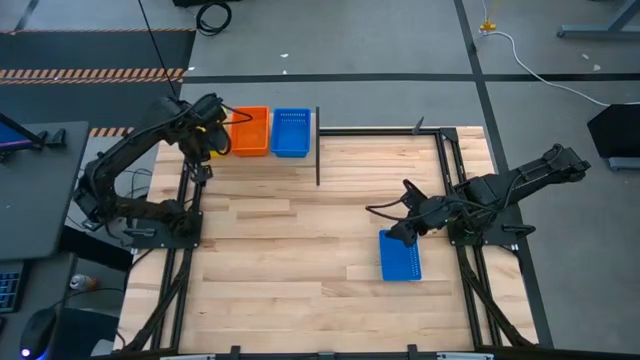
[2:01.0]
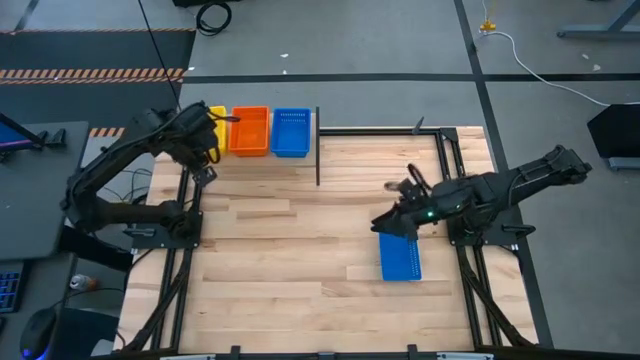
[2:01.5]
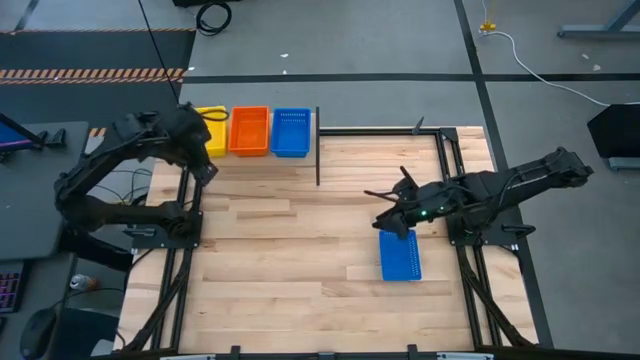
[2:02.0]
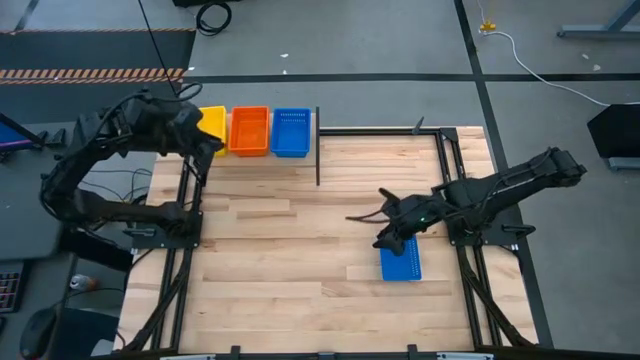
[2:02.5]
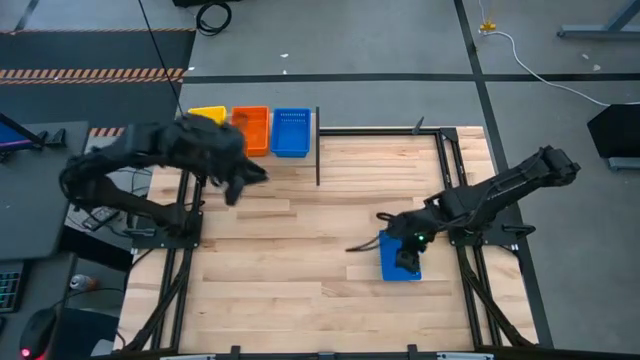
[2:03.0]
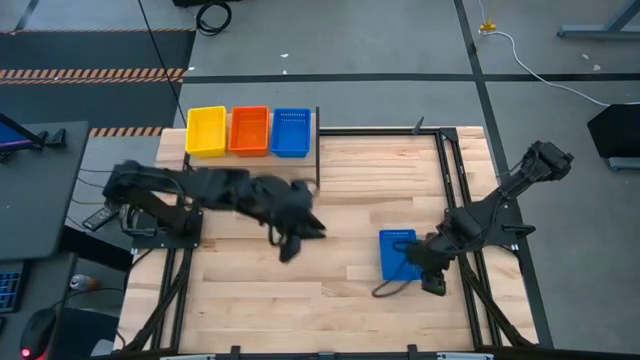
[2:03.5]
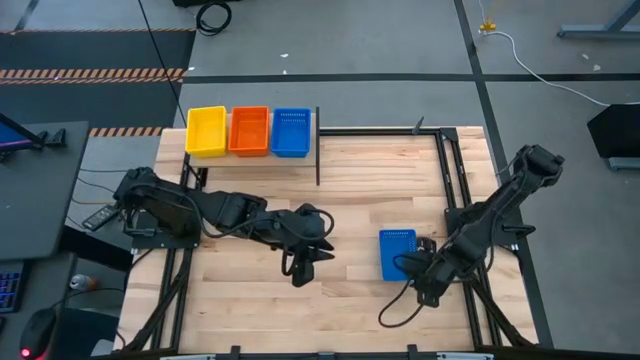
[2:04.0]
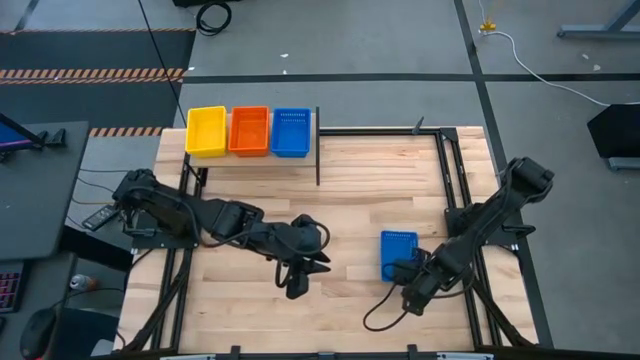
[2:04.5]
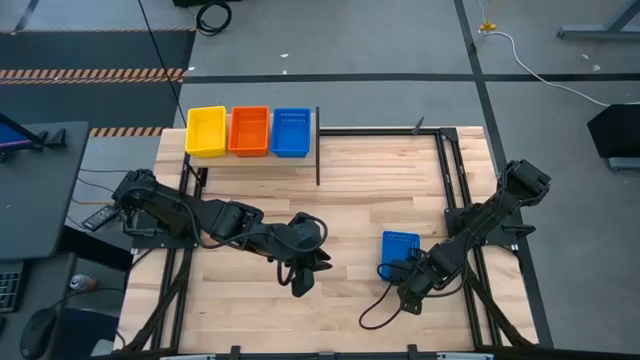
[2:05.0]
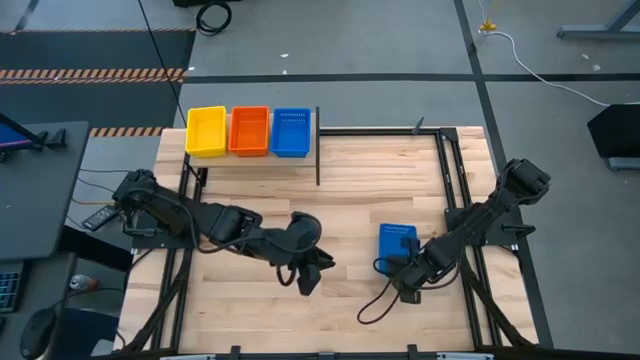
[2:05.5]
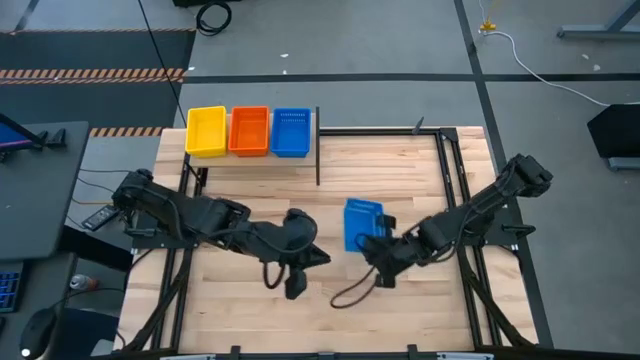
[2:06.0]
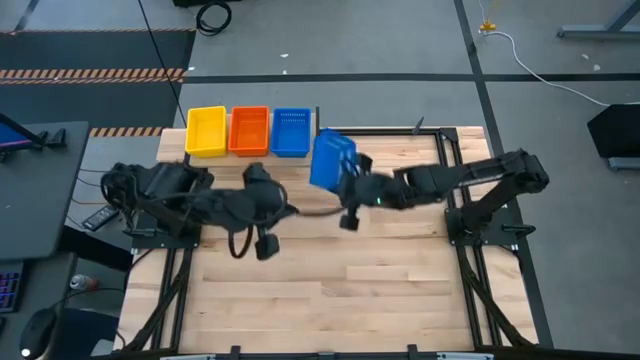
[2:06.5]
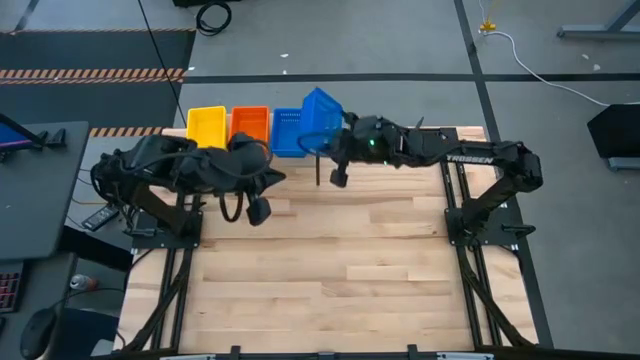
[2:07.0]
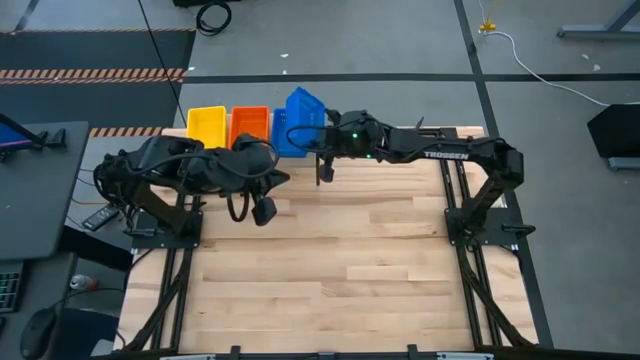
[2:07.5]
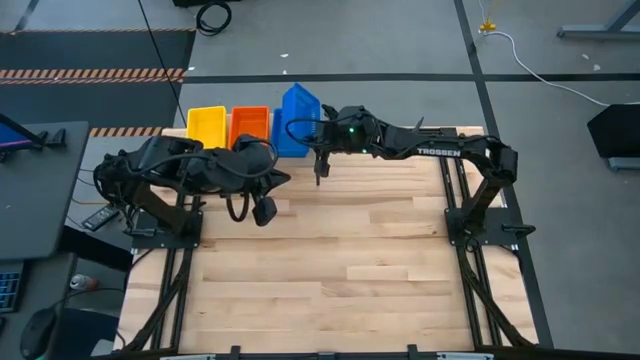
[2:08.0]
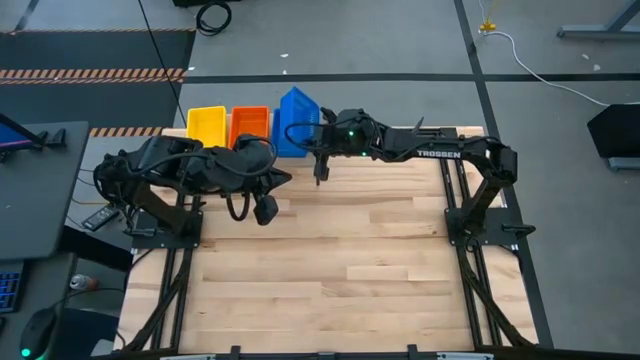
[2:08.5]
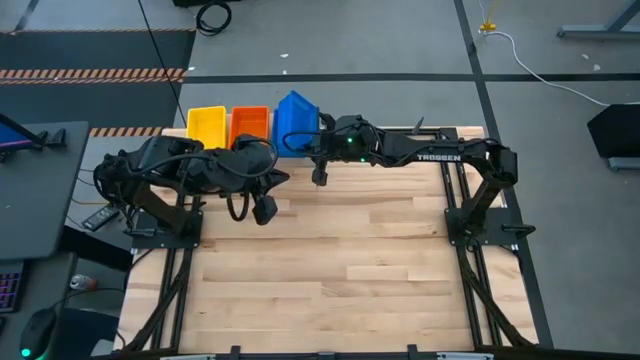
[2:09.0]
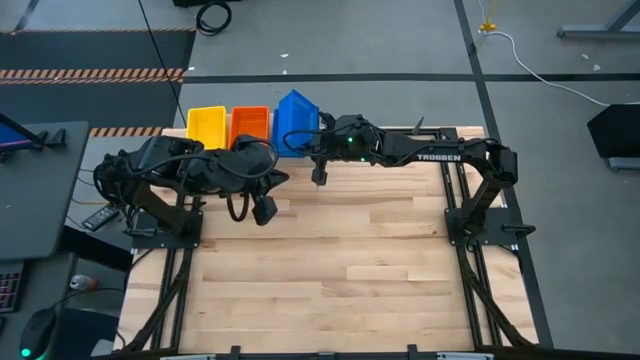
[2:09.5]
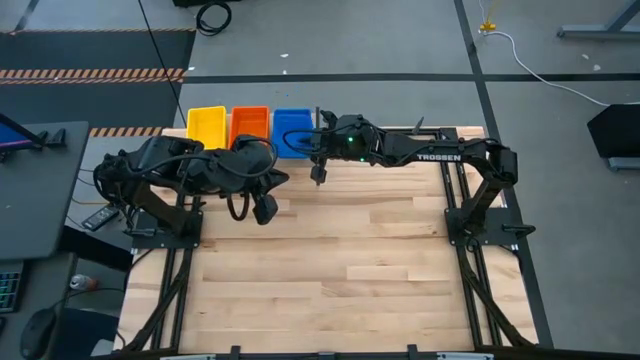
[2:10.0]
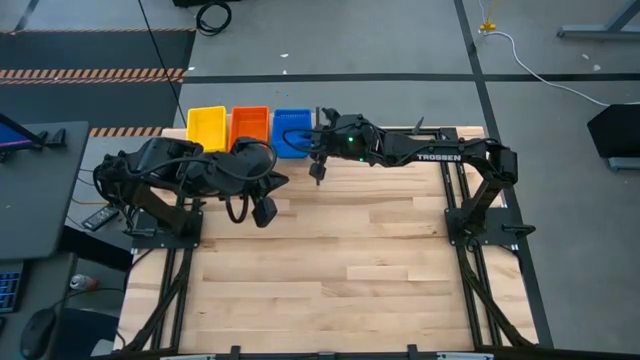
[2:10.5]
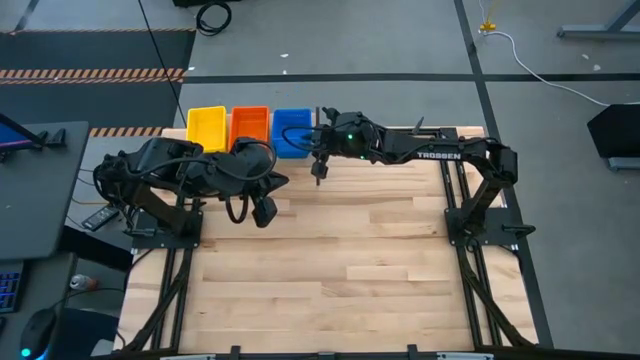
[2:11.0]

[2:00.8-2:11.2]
Task: Stack baskets on shelf by color
Stack the blue bin on top of the blue bin on the shelf

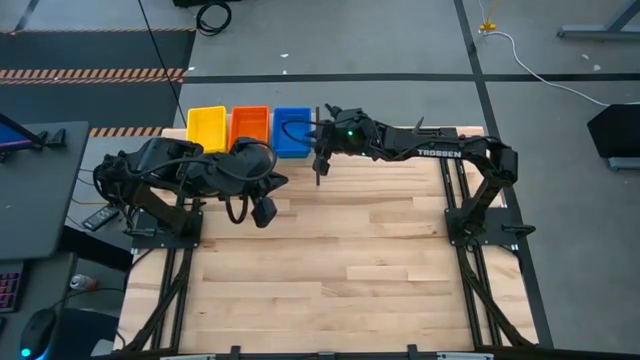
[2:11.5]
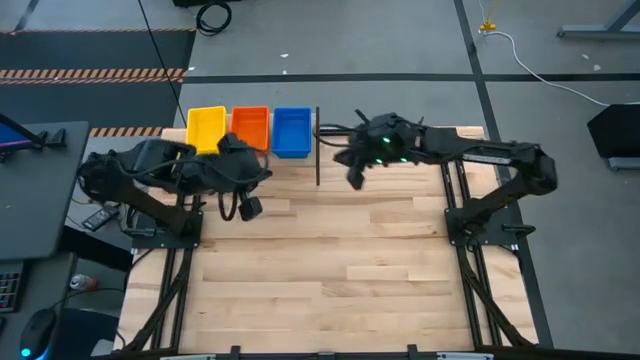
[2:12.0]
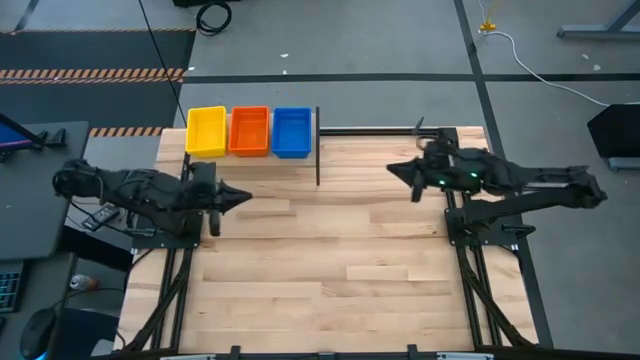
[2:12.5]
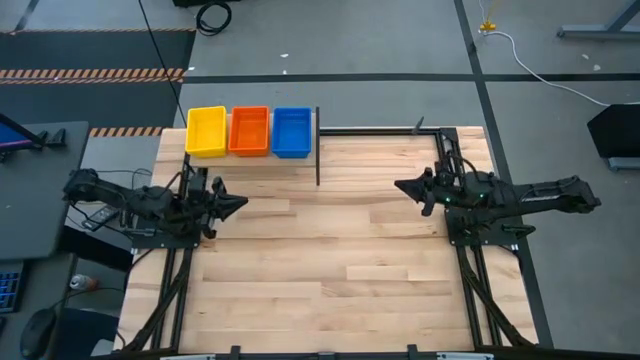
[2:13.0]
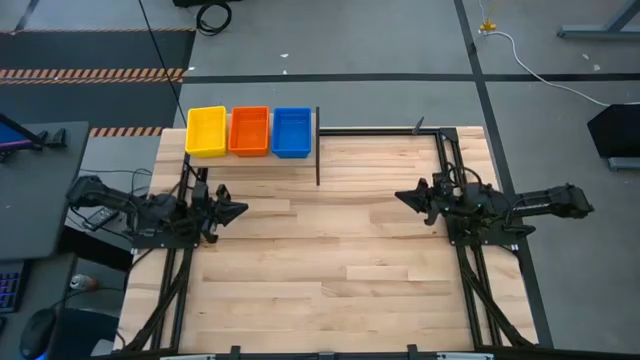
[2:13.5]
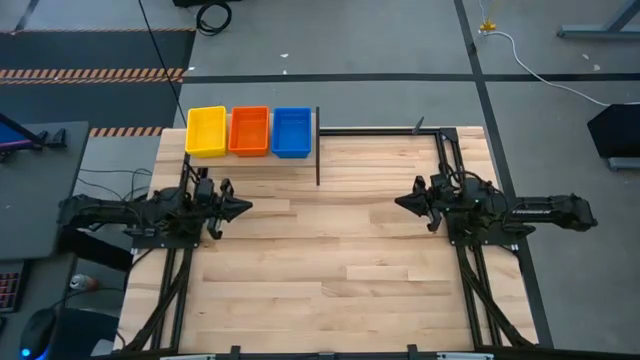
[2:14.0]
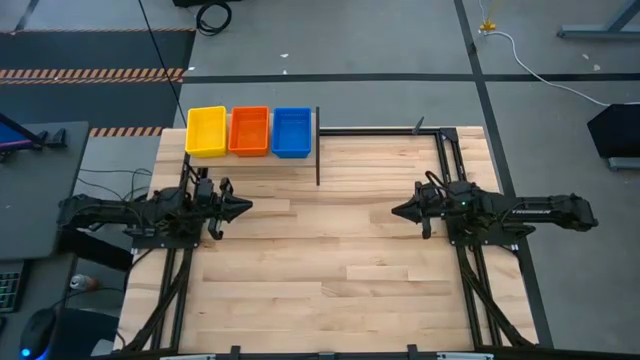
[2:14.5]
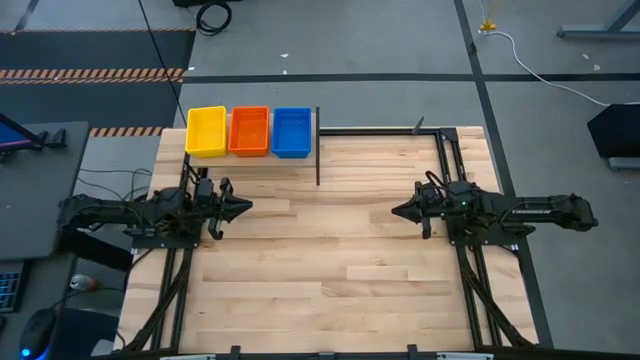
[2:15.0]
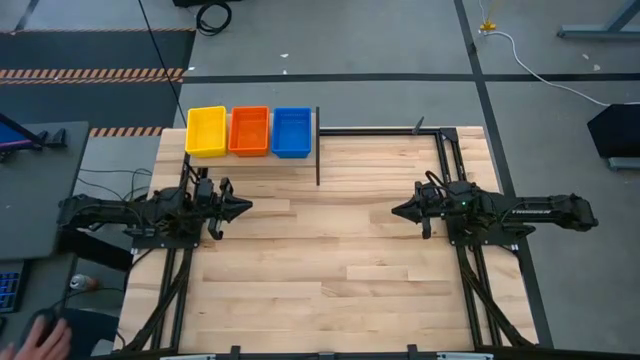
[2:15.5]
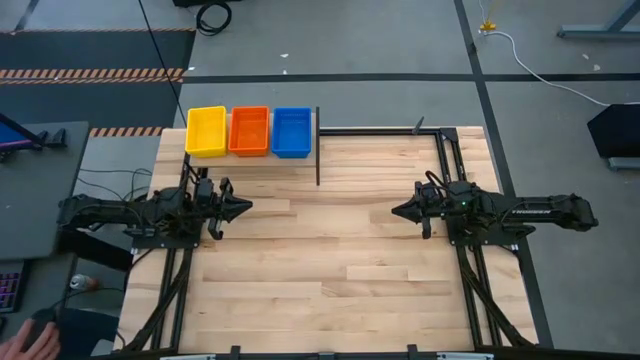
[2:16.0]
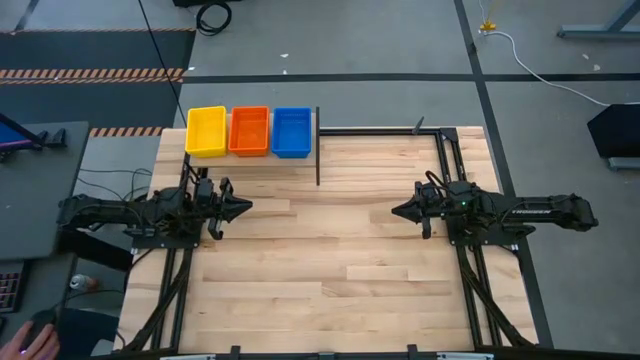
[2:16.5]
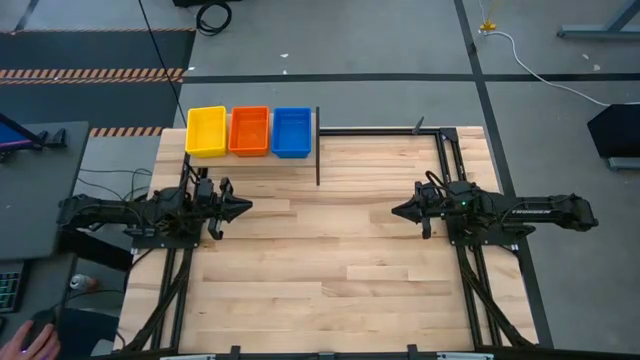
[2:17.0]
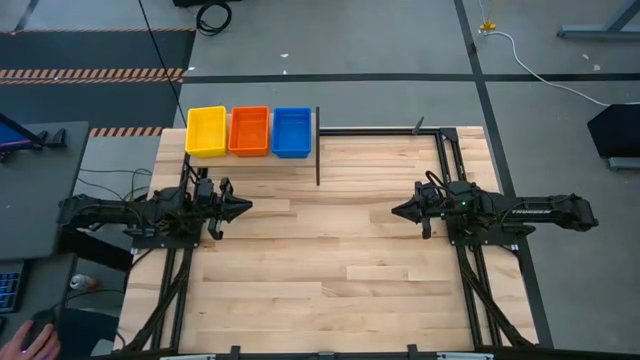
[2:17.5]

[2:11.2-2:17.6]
Return to Home Position

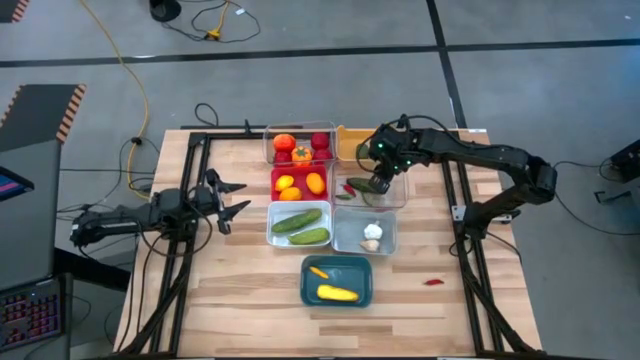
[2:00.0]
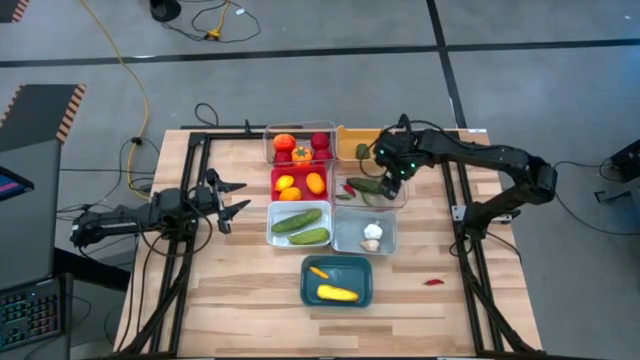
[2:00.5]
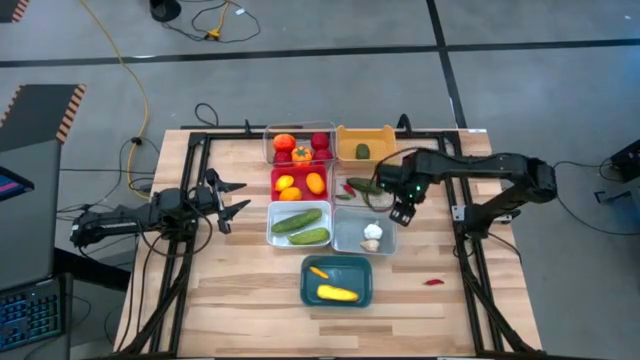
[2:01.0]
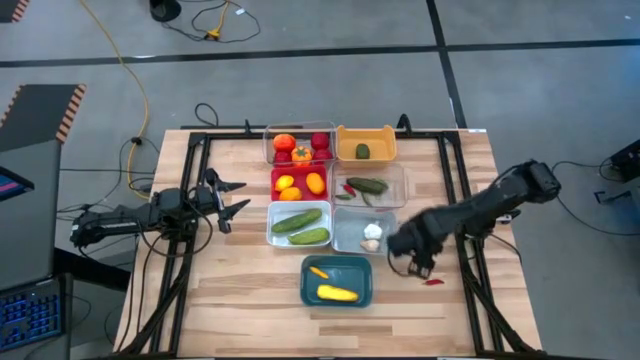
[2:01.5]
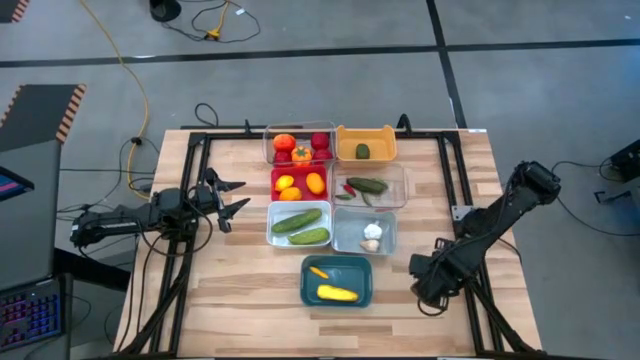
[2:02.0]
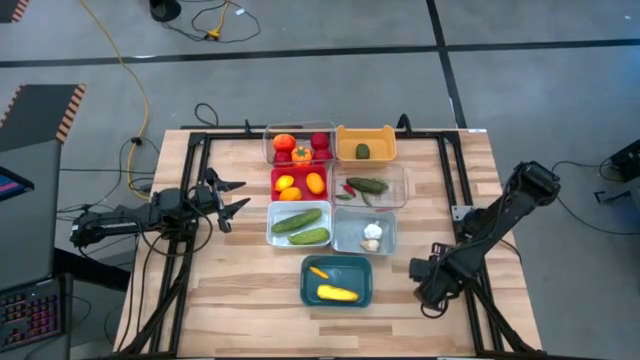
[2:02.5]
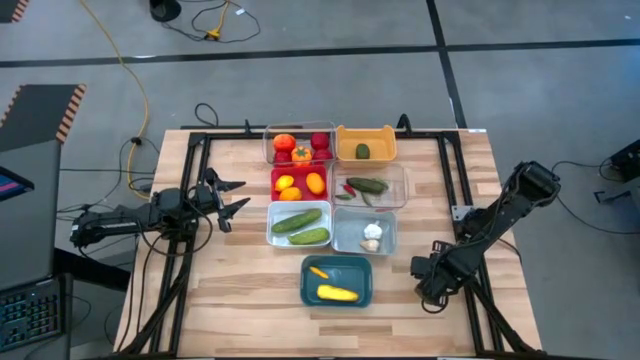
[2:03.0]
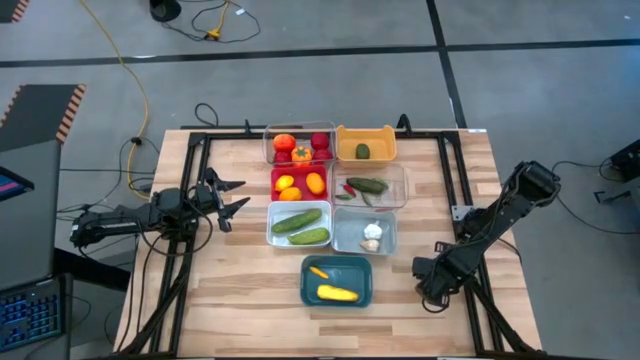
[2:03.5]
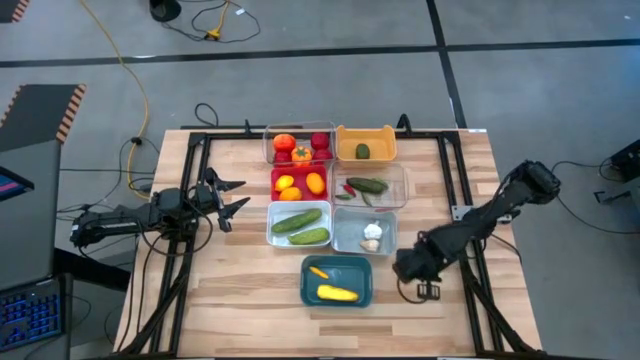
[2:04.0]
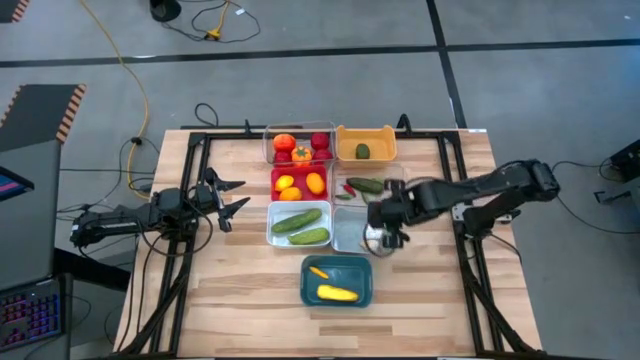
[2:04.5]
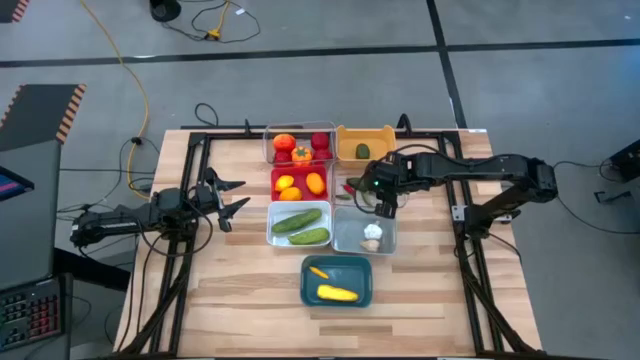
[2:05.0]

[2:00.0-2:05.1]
Task: Sort produce into baskets
Put the red chili pepper into the bottom transparent bin
